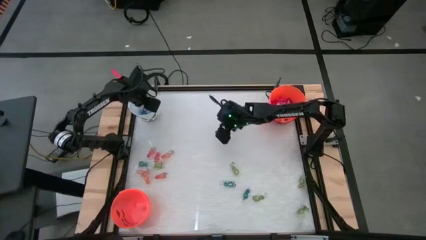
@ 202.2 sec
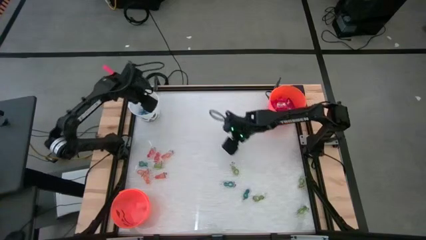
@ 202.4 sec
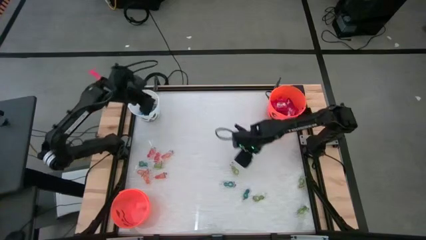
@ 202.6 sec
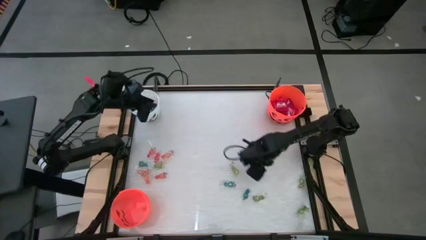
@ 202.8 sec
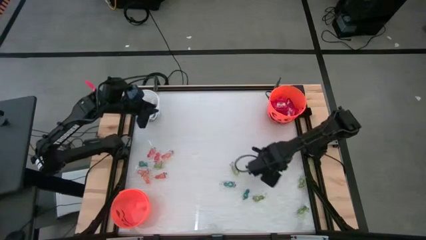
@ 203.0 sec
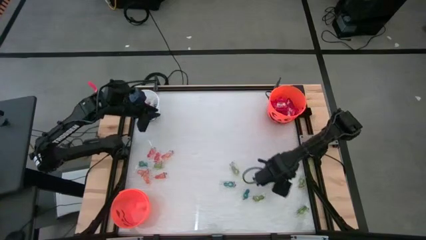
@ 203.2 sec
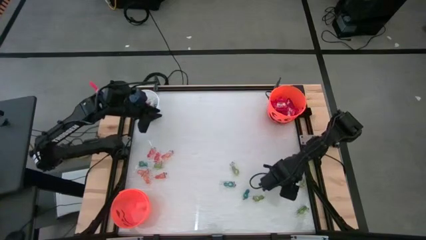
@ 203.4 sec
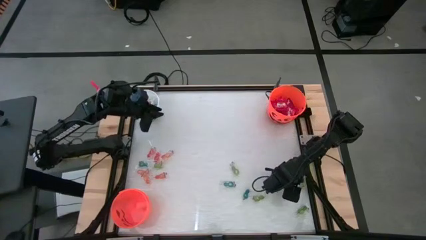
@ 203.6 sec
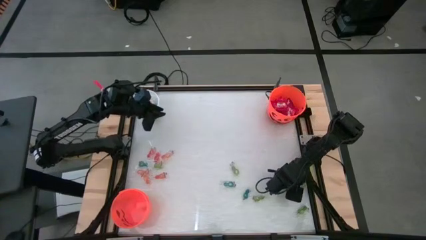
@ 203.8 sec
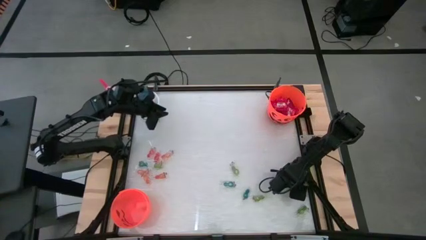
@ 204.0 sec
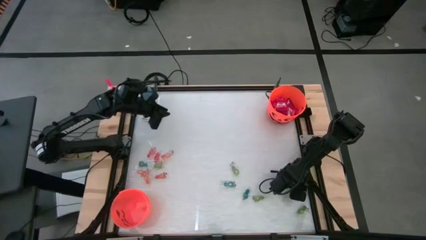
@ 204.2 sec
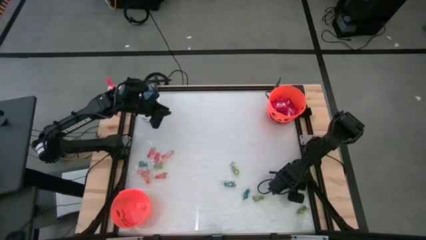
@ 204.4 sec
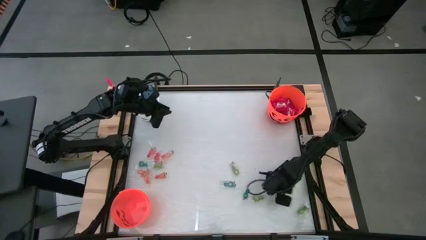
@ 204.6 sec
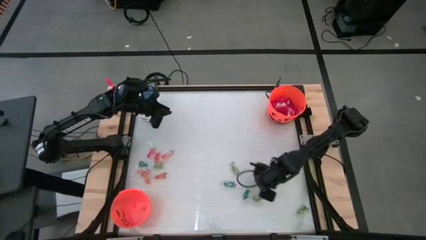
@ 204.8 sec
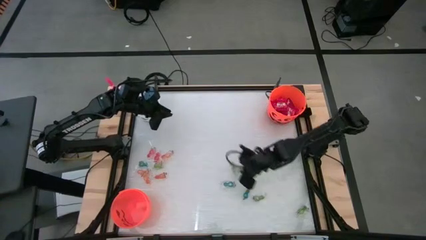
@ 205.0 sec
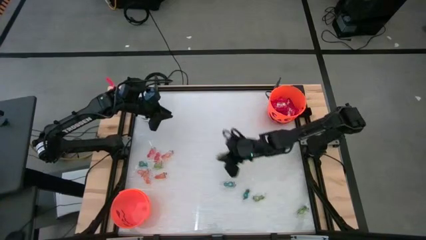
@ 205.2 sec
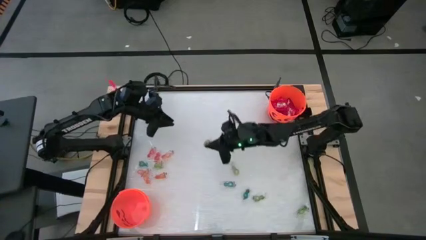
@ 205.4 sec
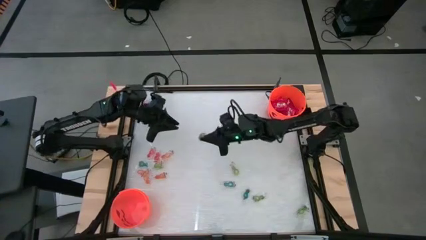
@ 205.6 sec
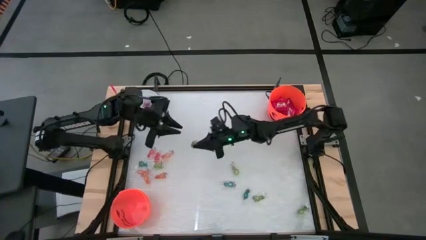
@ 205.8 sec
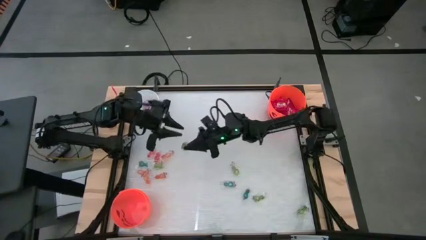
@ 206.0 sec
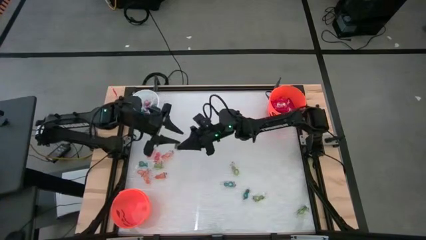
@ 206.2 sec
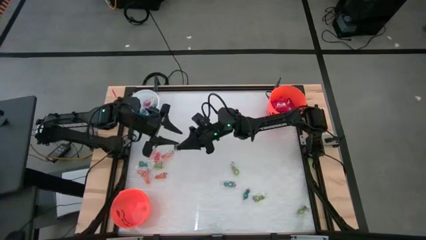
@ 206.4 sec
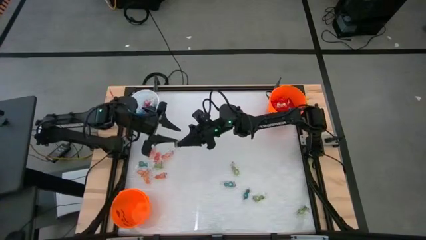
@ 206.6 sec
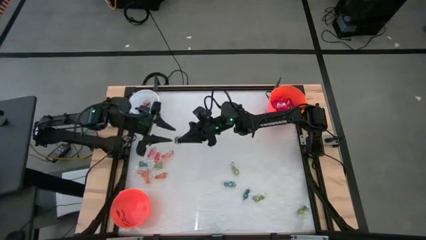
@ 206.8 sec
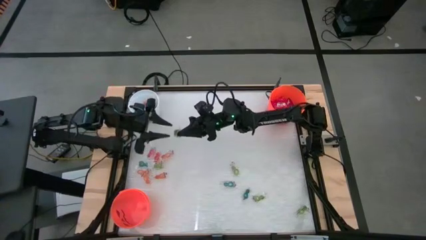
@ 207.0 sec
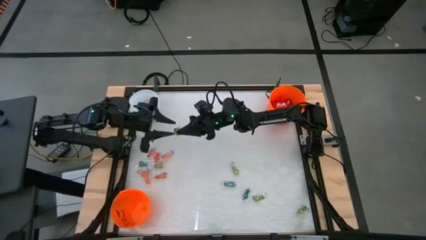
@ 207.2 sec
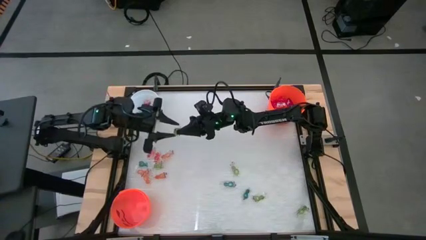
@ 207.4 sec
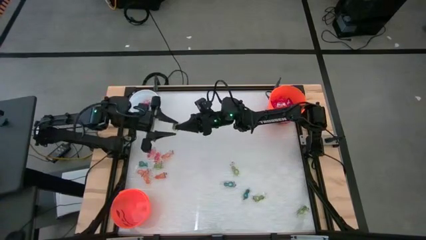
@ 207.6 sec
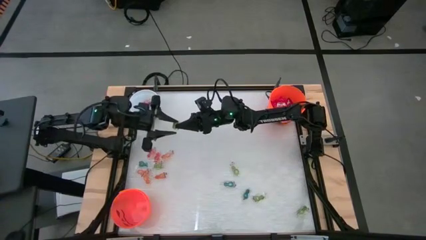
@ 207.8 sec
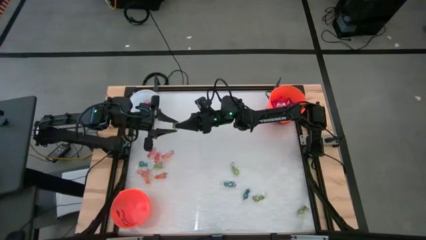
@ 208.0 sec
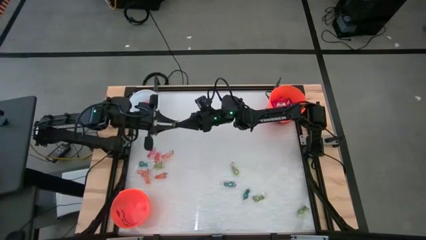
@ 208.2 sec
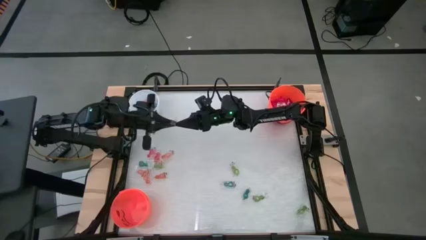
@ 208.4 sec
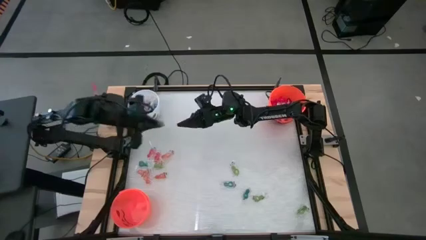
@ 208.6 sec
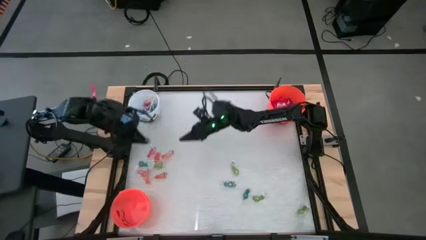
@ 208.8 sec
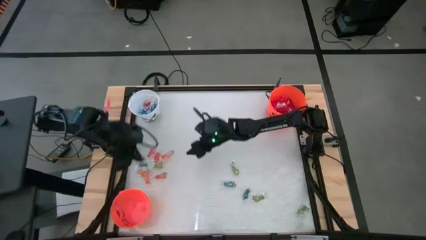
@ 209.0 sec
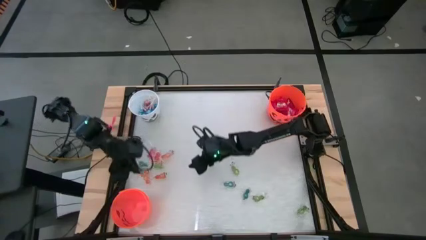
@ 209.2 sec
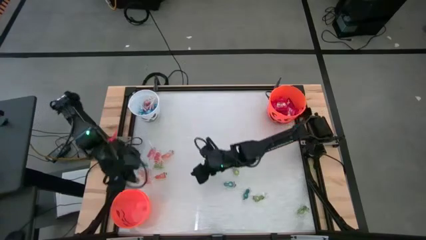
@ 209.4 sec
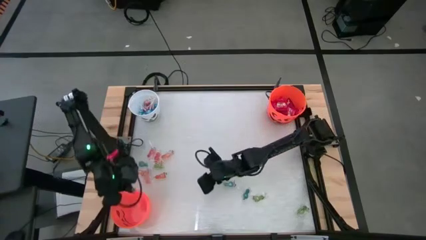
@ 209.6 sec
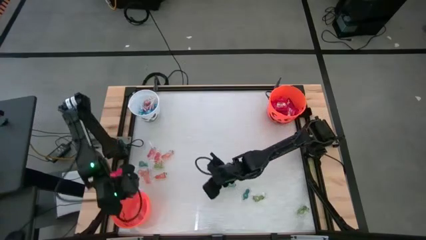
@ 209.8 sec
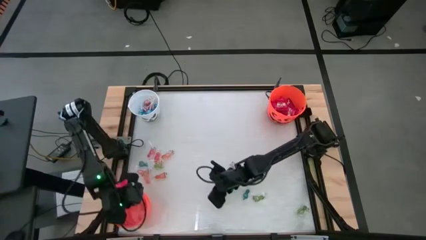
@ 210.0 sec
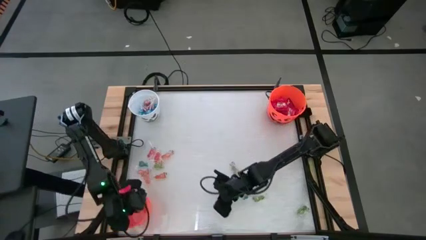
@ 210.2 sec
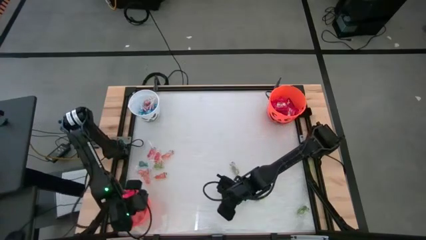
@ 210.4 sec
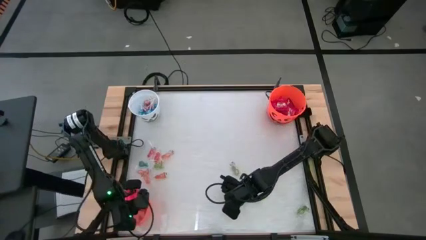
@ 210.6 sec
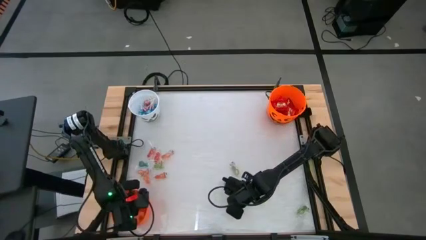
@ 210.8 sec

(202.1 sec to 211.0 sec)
Task: Sort candy by brand, put in halloween buckets
Put the green gummy into the bottom orange bucket

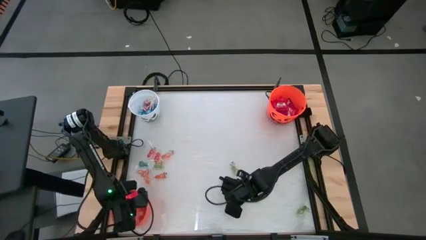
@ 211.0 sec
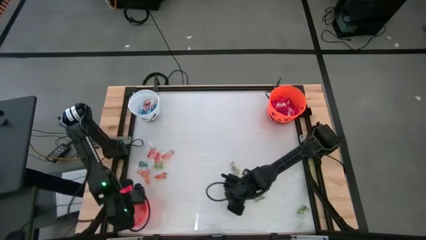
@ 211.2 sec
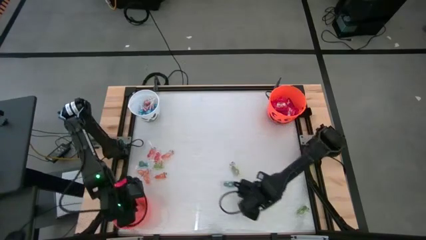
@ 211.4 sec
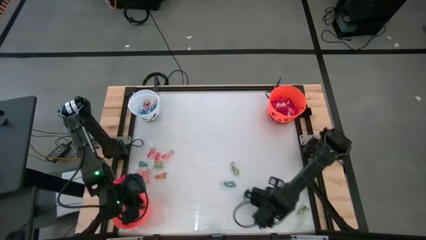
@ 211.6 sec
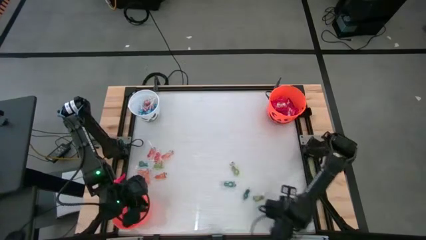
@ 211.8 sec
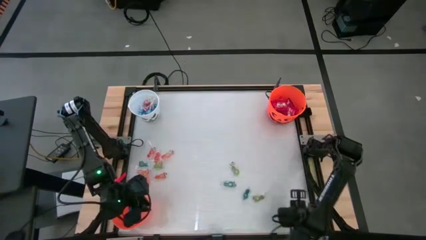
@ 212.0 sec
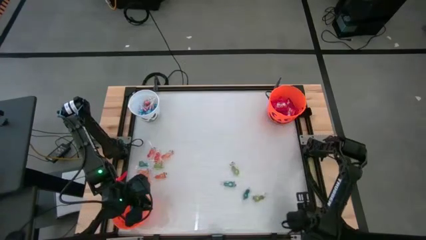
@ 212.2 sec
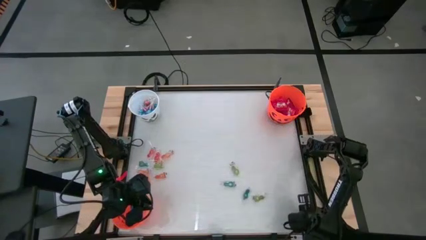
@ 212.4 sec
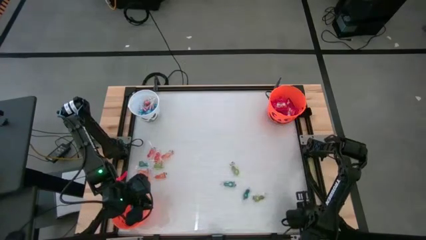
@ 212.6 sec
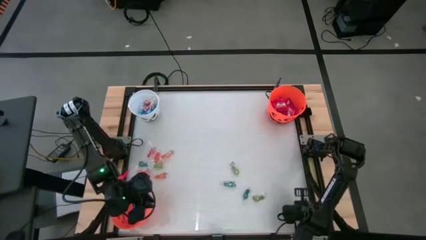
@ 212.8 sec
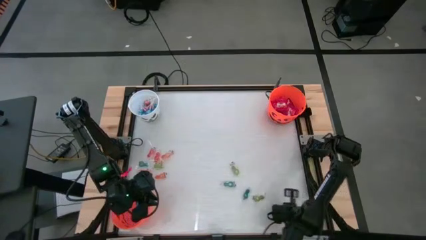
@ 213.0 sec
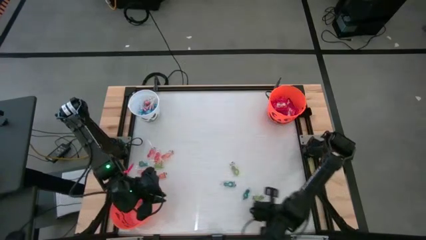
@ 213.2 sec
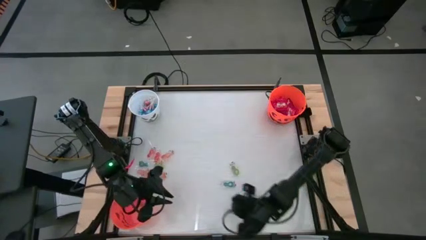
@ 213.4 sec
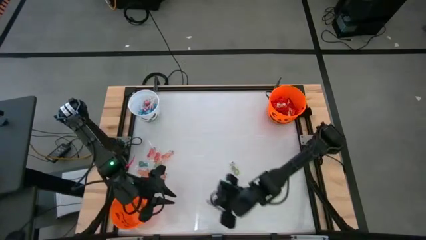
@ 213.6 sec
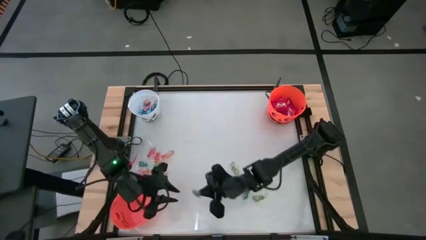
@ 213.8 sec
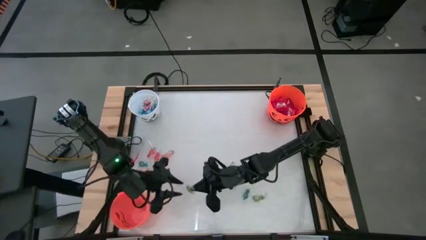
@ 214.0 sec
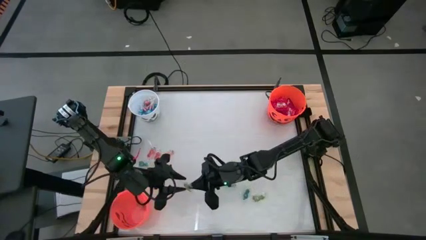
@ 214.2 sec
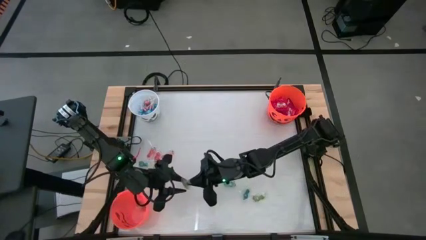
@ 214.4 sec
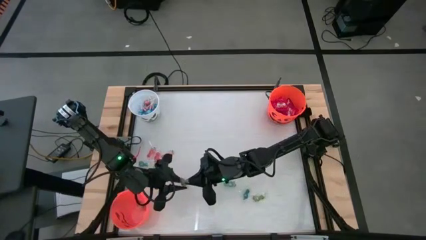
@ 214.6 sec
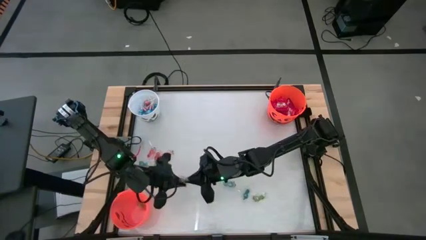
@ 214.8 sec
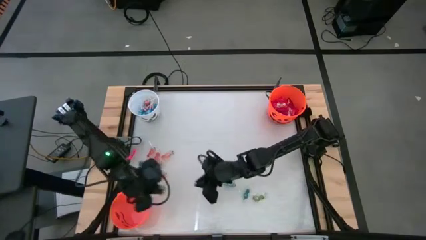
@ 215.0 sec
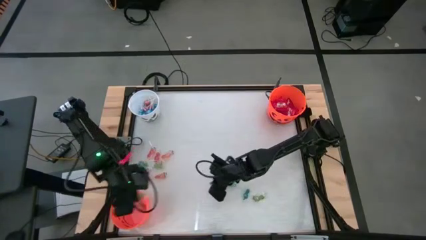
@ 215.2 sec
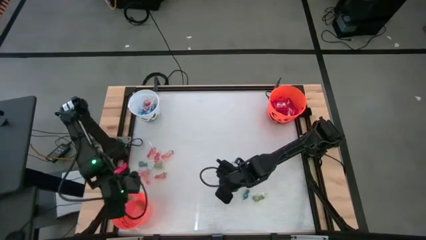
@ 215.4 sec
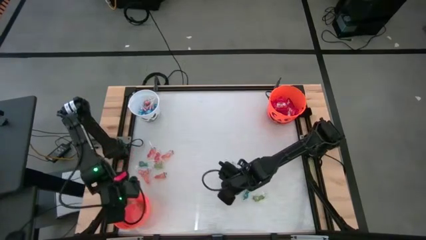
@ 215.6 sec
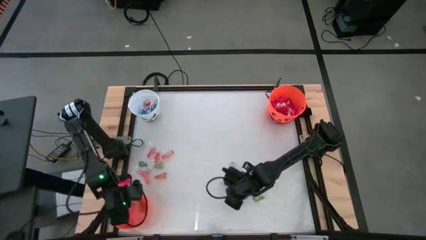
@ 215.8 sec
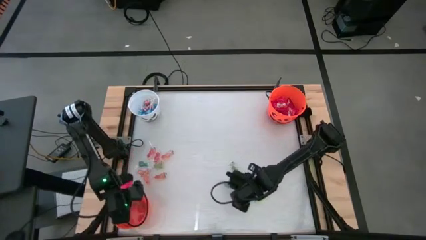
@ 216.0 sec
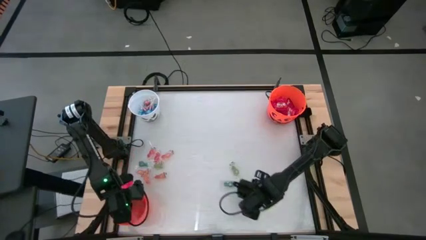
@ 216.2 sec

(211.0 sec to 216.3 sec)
Put the green gummy into the bottom orange bucket
